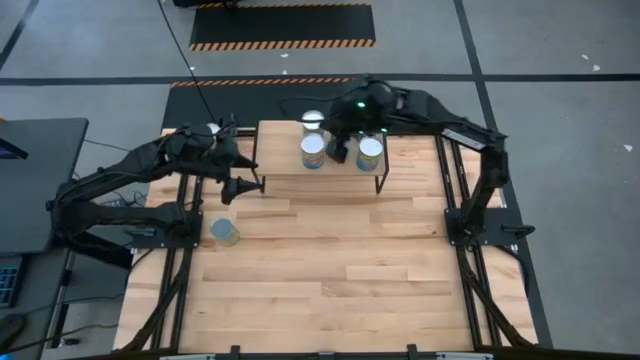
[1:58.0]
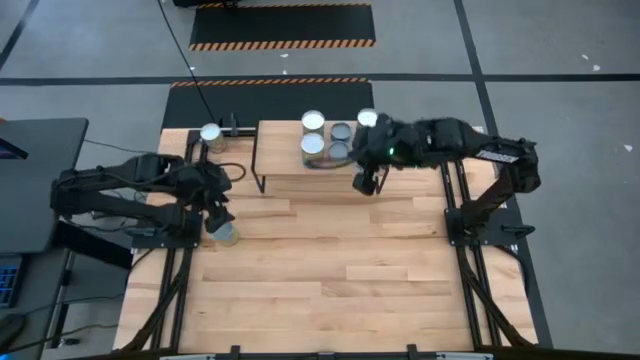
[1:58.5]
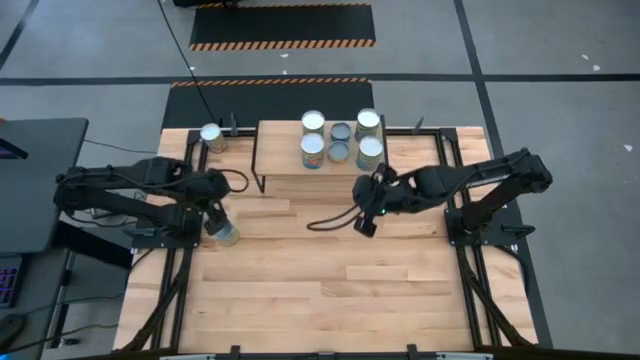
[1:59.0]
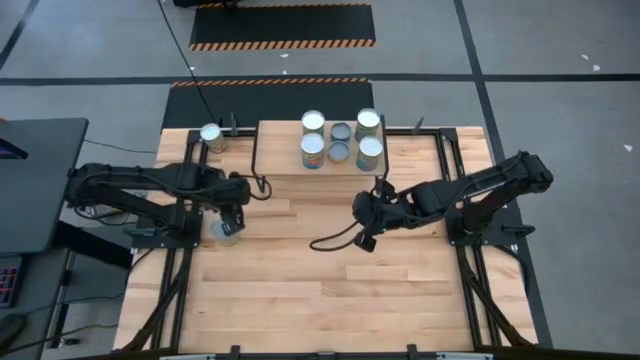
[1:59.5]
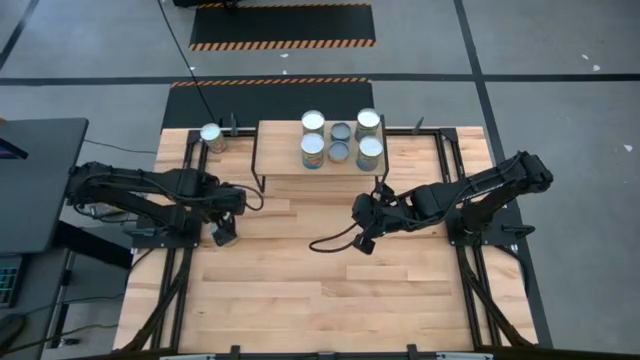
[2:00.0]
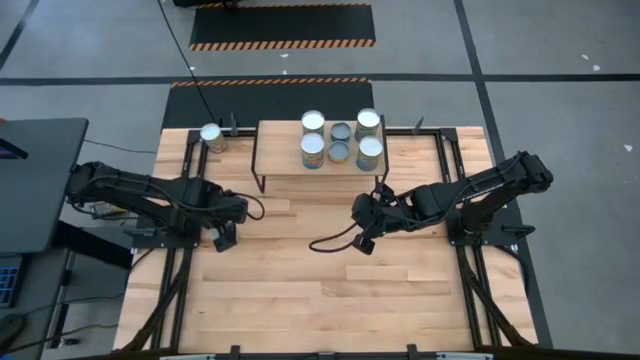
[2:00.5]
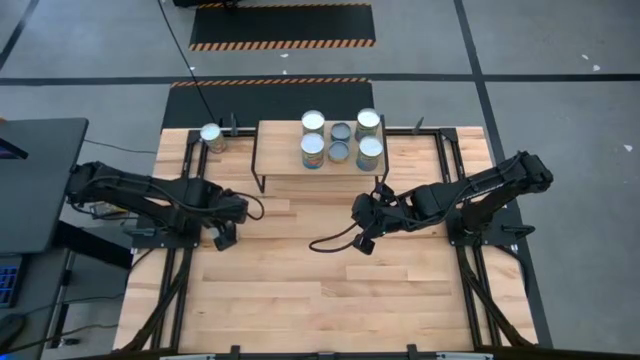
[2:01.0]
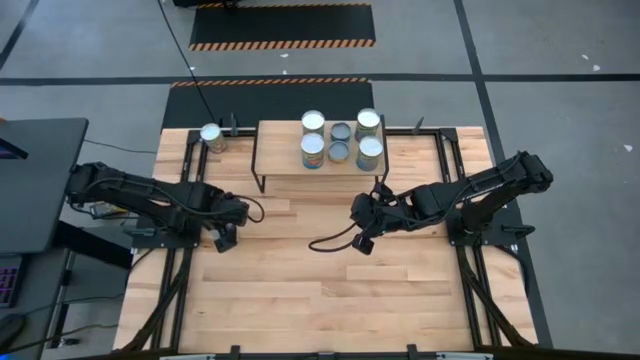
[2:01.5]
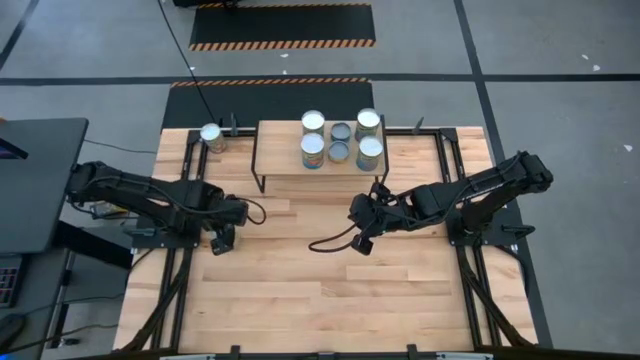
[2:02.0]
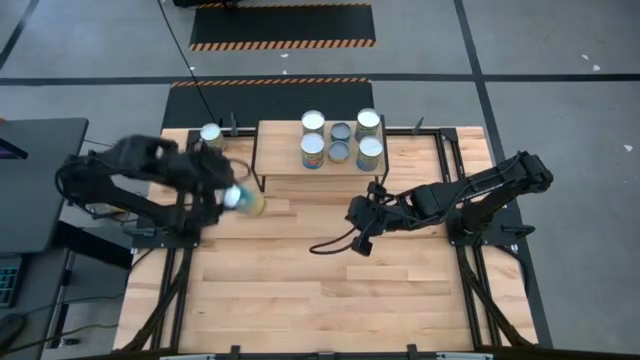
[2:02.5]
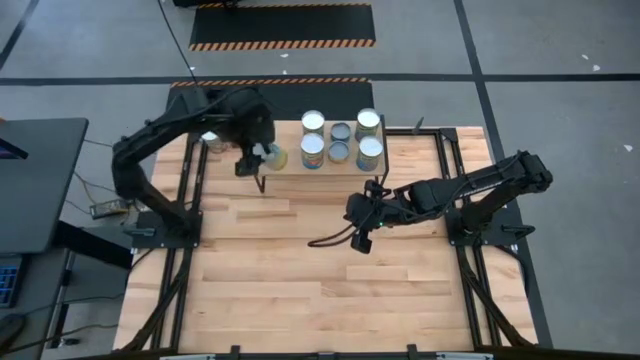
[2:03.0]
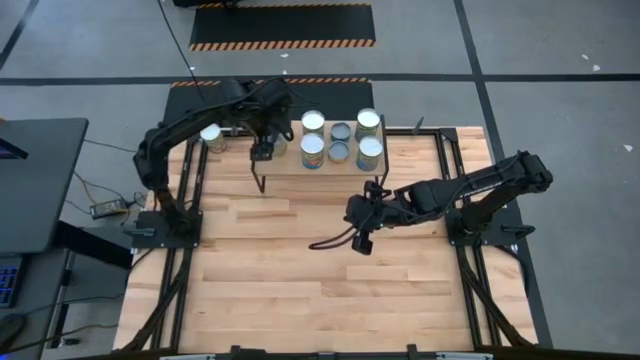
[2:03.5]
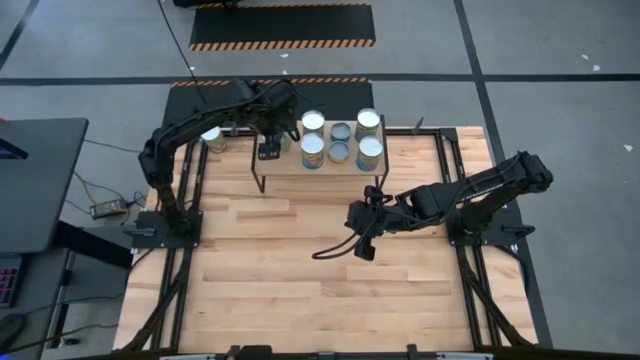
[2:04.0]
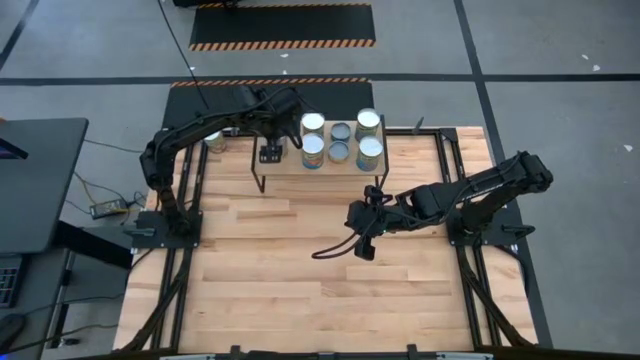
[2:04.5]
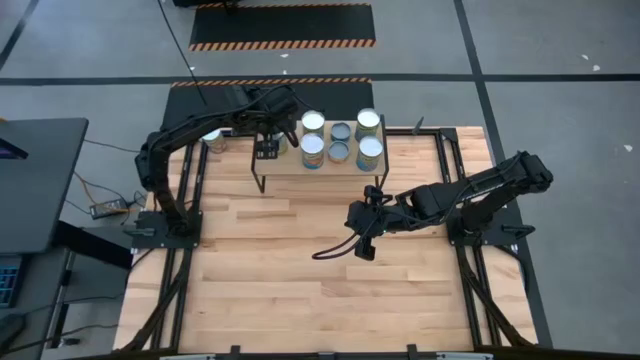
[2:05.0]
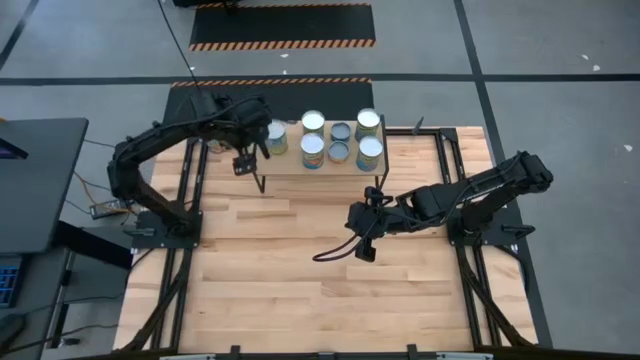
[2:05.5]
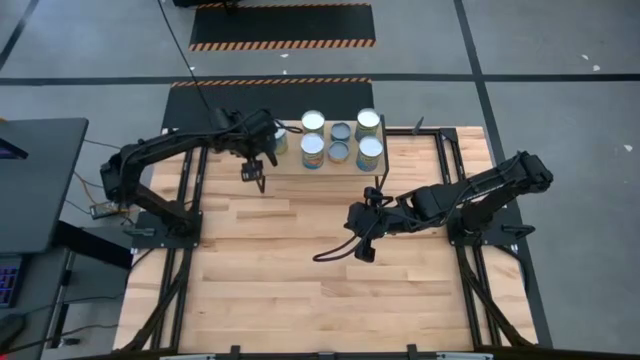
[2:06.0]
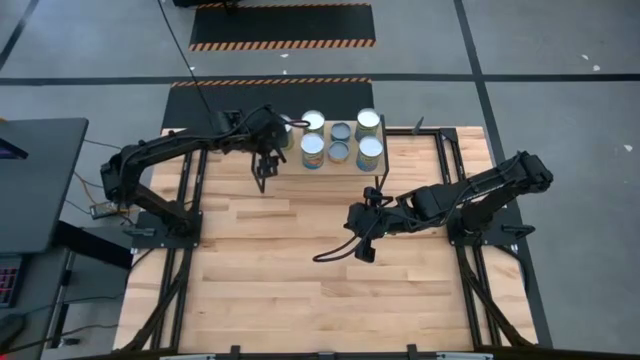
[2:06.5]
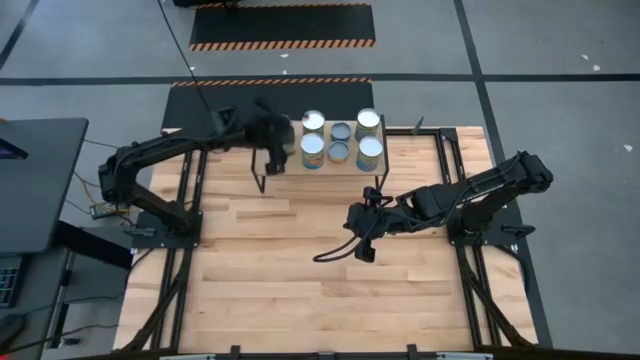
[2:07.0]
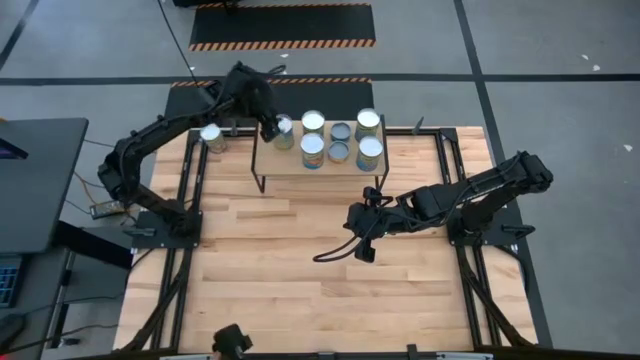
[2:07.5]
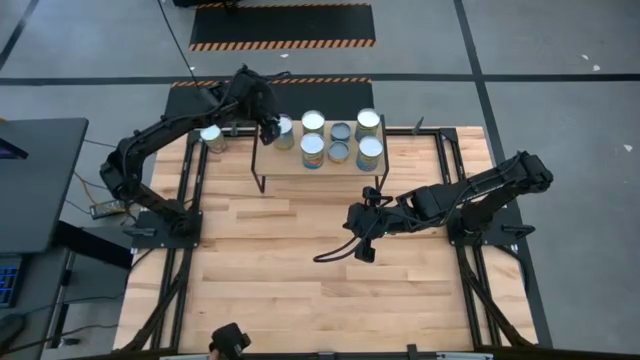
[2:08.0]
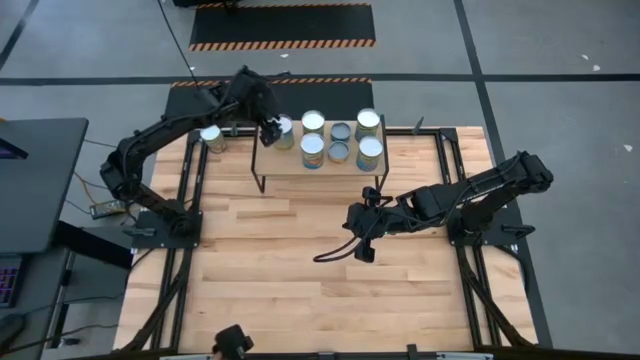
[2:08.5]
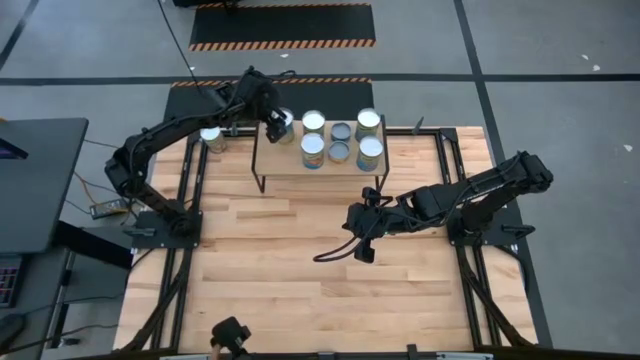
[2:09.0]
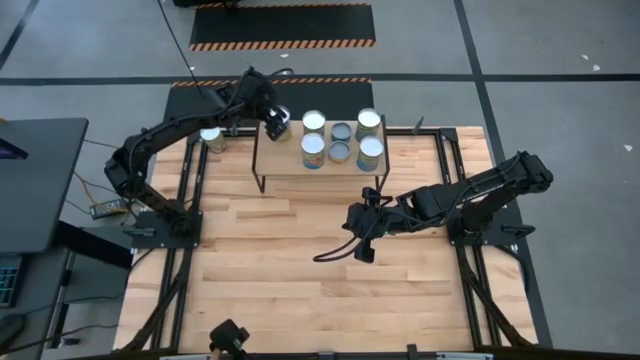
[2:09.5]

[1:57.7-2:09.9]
Task: Pick and place cans onto a shelf
Put the big yellow canned carrots on the shelf

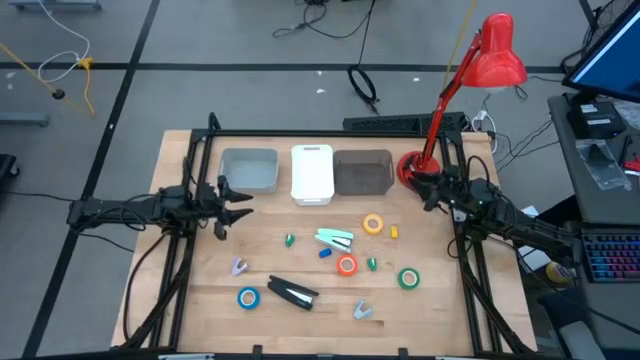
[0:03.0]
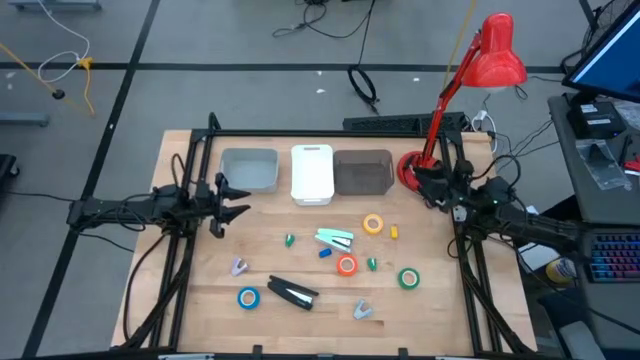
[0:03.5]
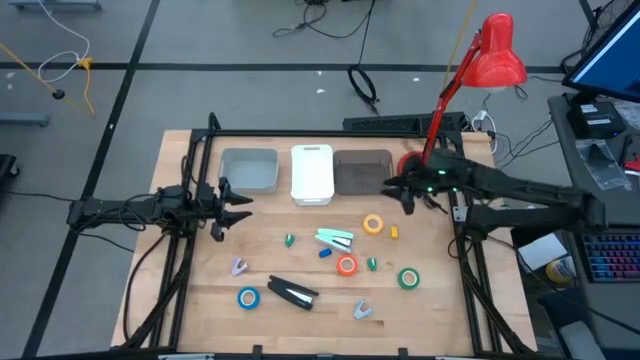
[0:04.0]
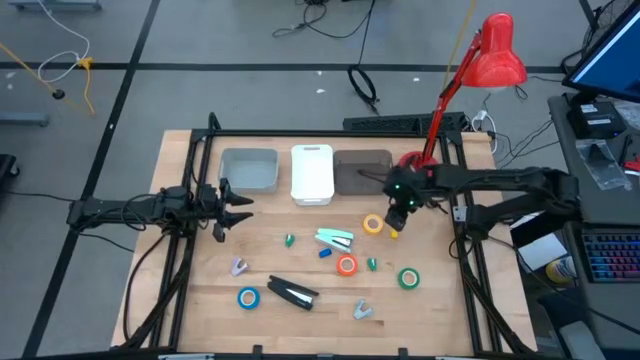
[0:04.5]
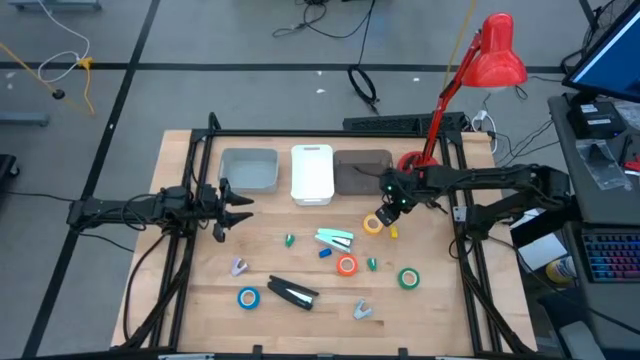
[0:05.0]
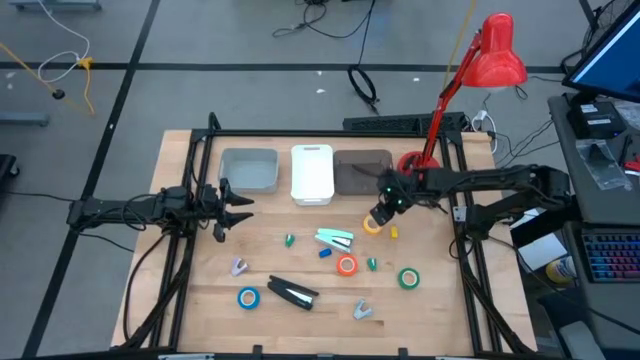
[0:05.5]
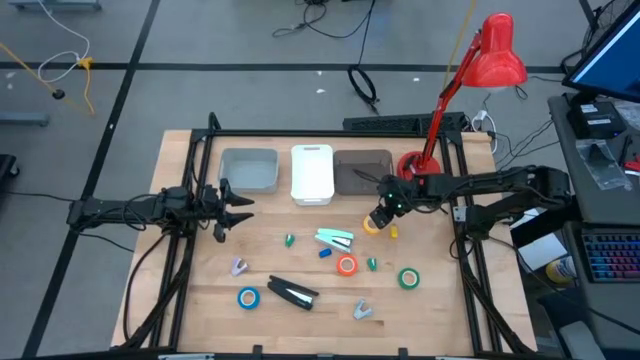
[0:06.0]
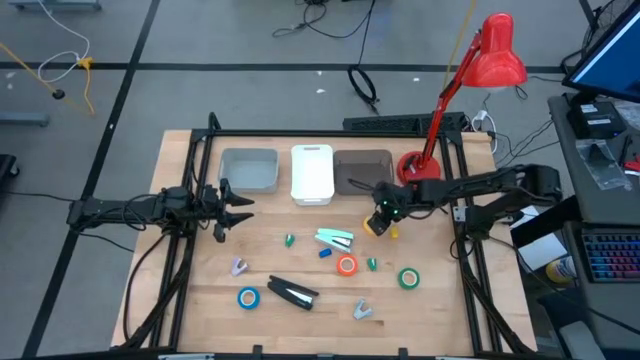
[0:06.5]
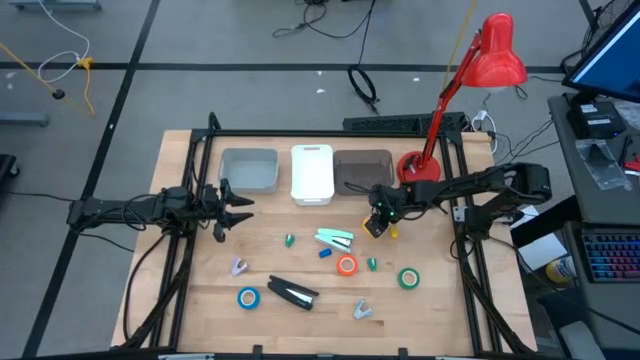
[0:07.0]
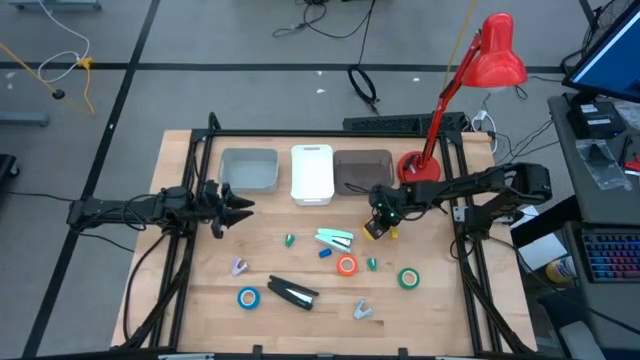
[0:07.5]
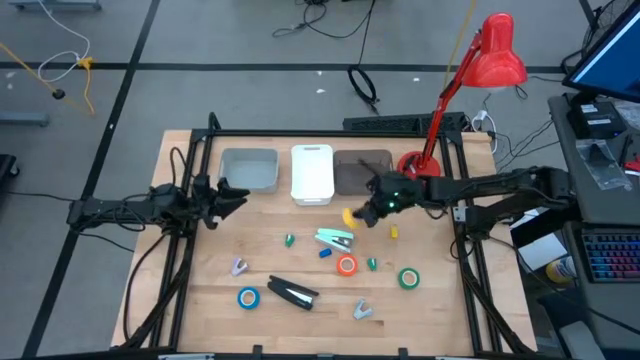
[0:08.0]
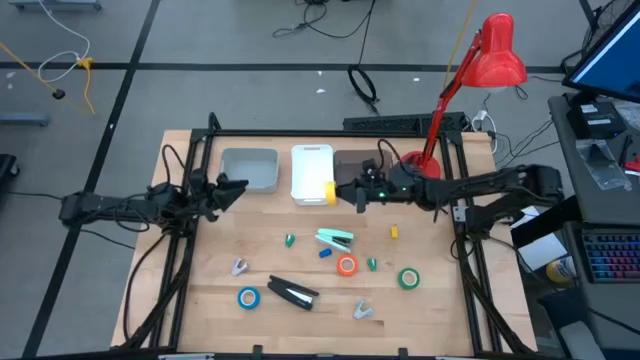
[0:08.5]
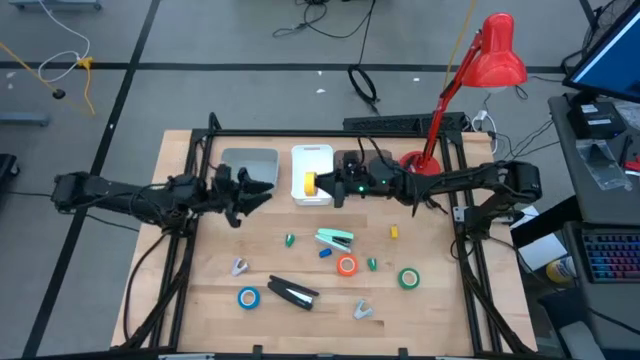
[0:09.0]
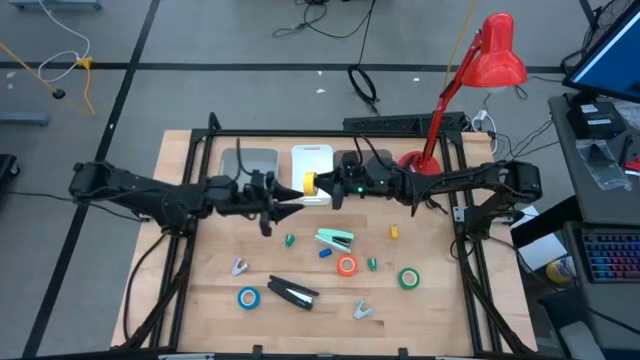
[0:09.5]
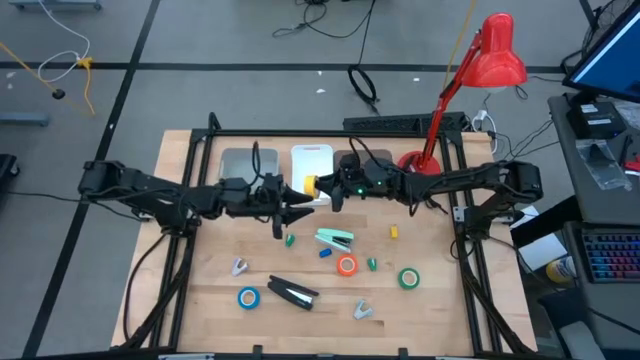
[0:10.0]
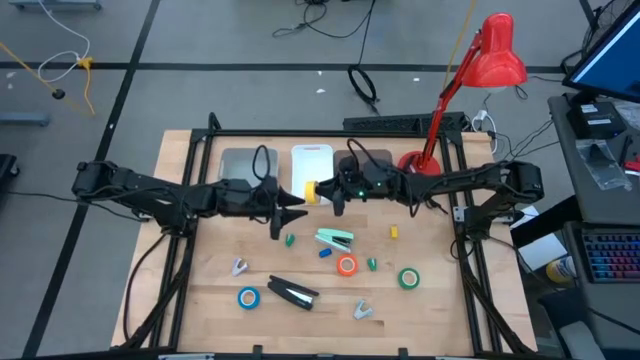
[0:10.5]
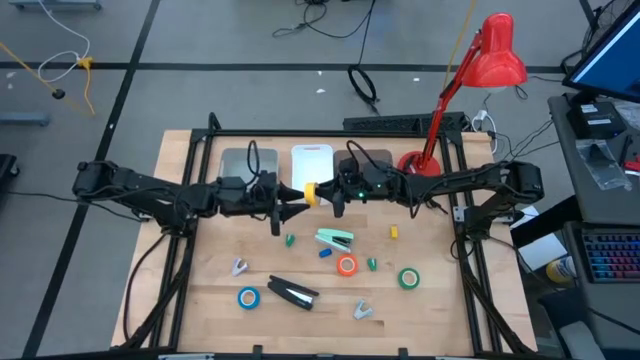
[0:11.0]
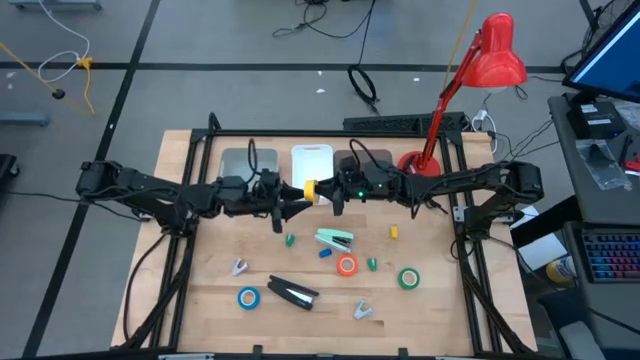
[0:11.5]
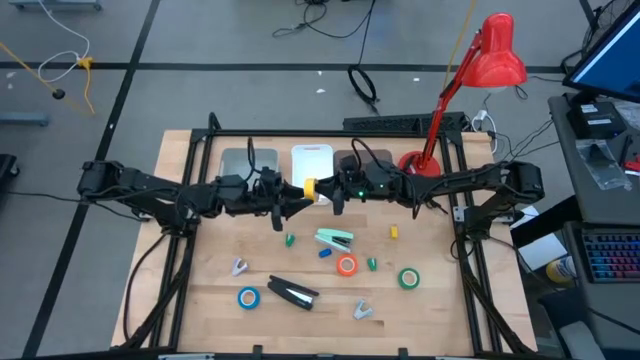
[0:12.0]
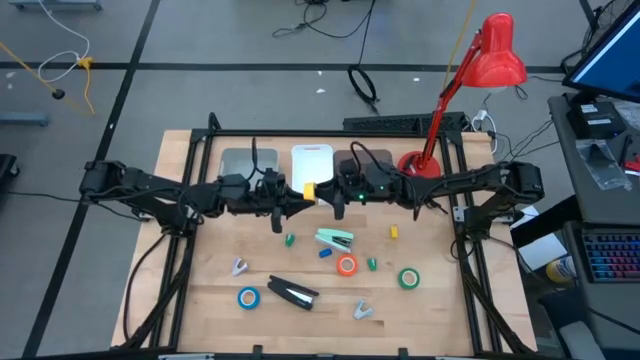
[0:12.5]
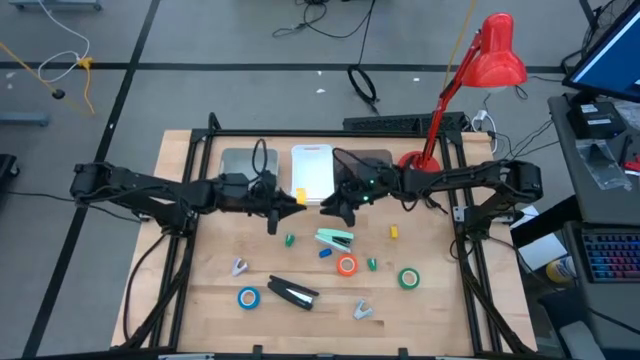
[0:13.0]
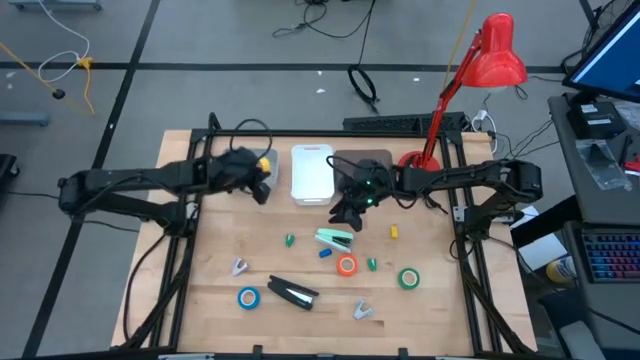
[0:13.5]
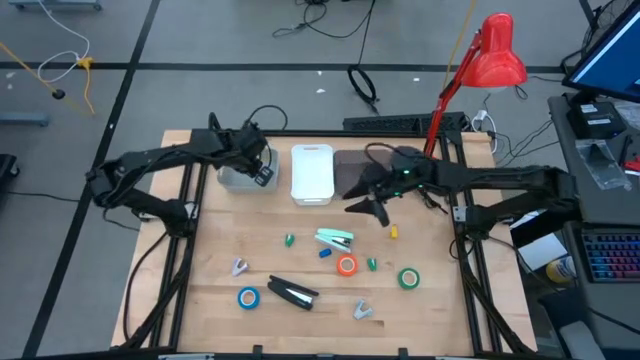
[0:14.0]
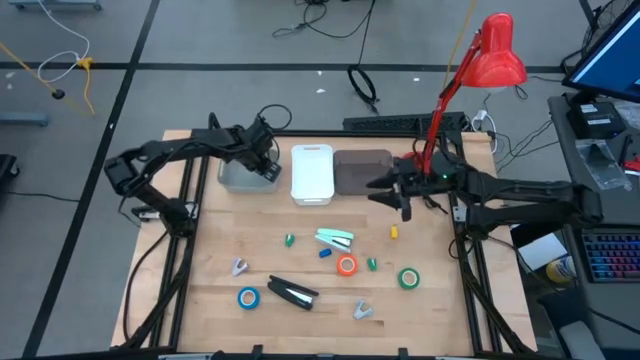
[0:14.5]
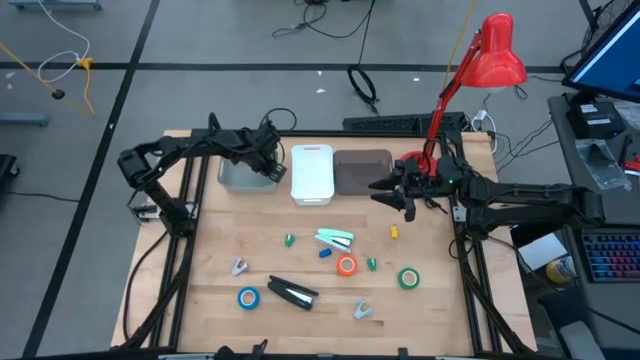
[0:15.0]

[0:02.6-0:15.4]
Task: Pick and place Stapler, Stapler remover, tape
Put the yellow tape into the gray bin
